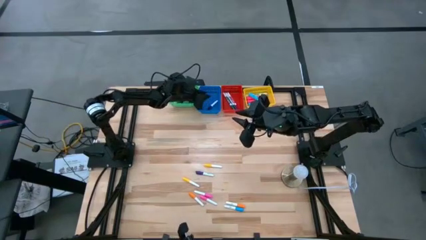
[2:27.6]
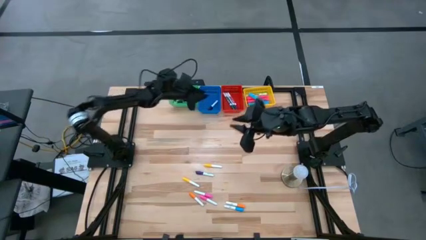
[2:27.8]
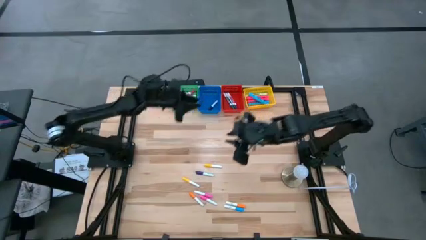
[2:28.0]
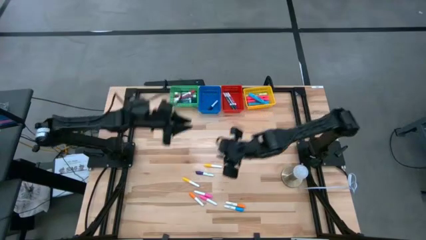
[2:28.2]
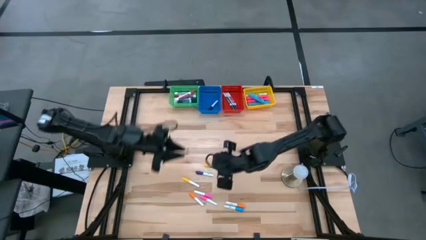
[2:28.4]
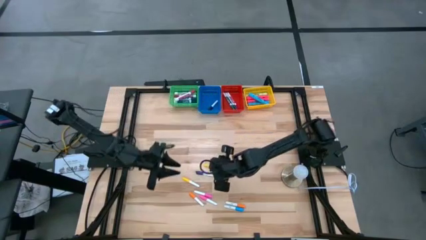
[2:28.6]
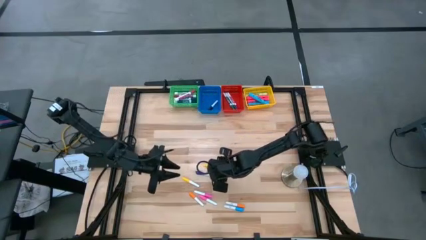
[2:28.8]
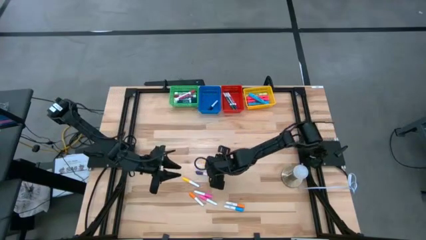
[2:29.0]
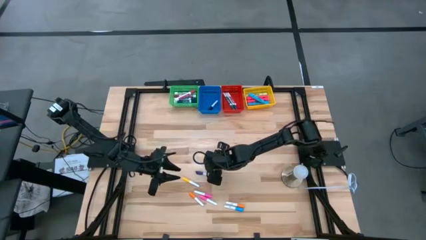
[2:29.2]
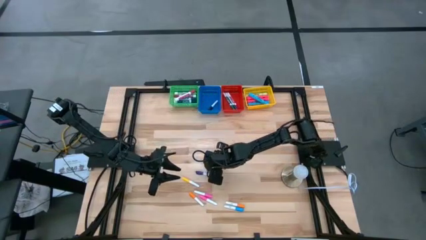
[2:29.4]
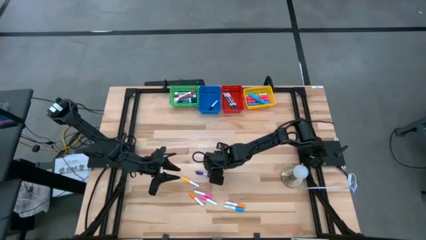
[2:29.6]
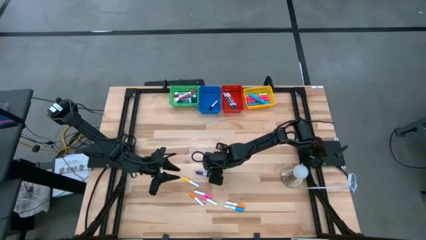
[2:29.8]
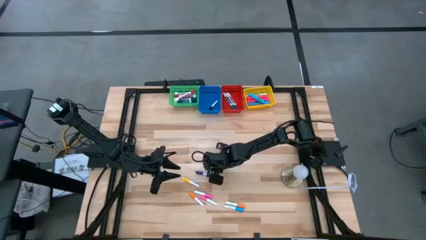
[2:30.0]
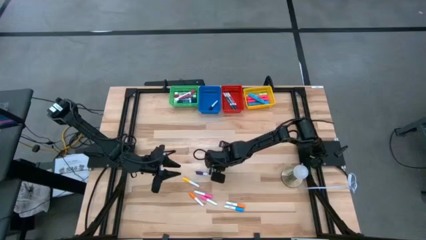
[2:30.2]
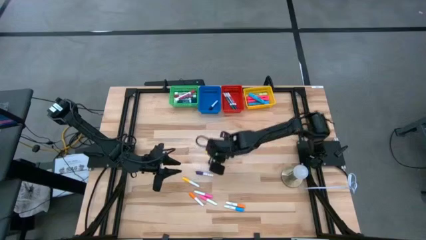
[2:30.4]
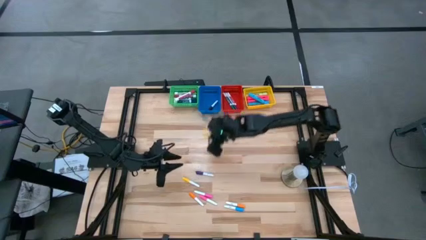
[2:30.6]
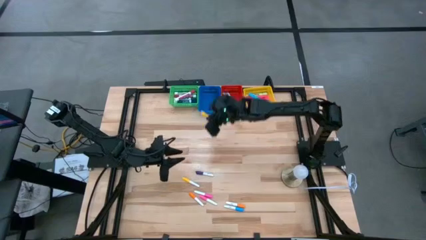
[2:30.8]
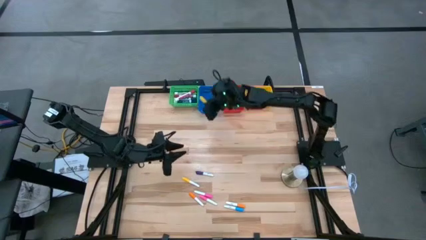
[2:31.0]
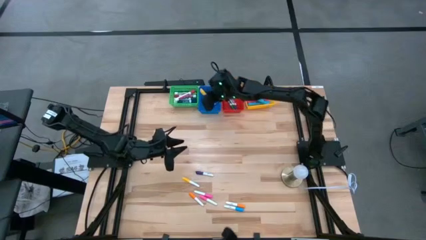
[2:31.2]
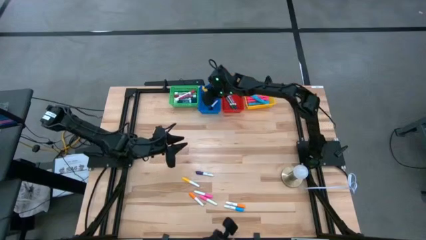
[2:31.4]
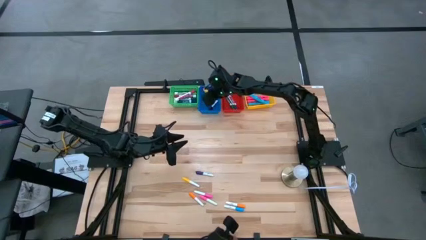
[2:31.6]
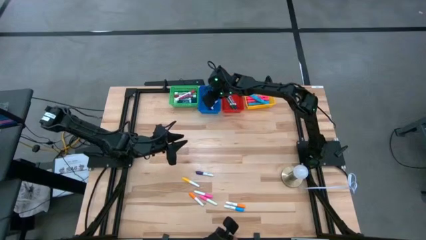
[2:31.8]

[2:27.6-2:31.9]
Task: Pick & Place Markers
Put the top small yellow highlighter pen into the blue bin

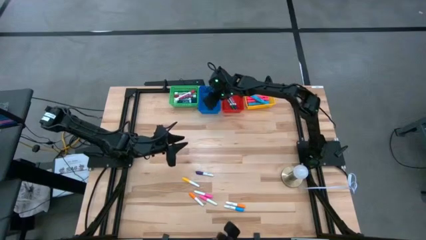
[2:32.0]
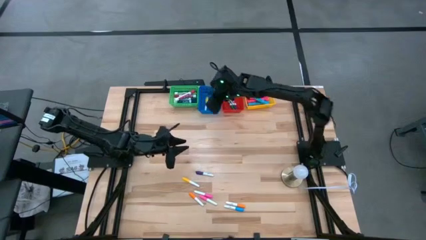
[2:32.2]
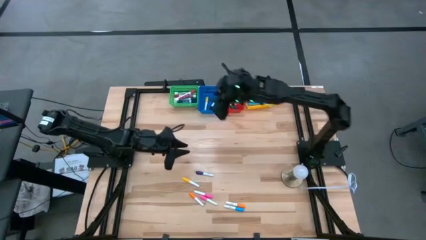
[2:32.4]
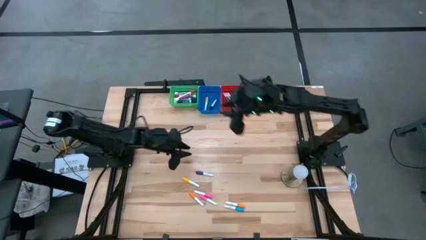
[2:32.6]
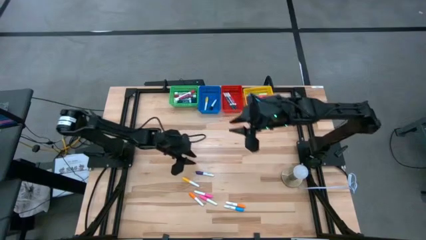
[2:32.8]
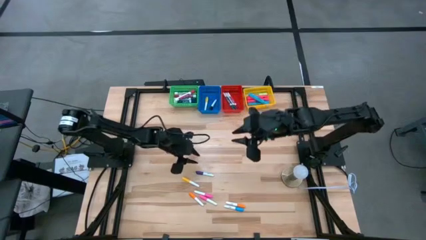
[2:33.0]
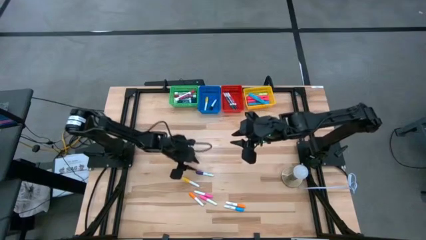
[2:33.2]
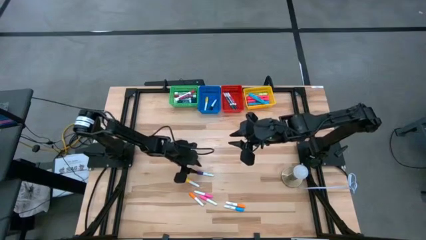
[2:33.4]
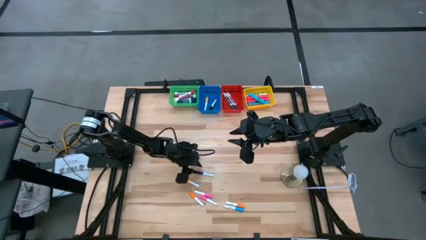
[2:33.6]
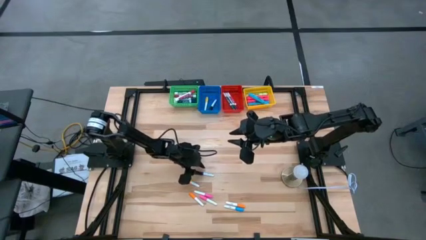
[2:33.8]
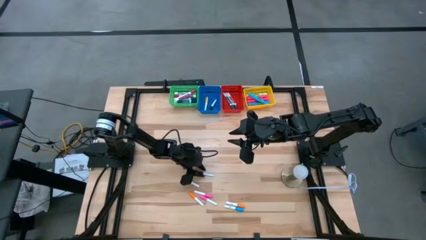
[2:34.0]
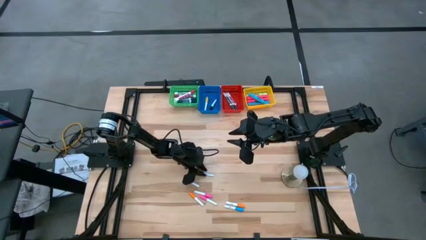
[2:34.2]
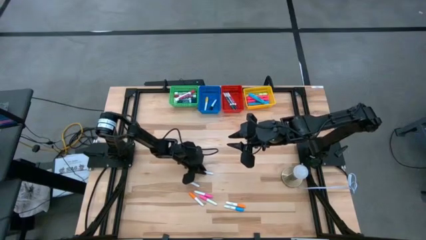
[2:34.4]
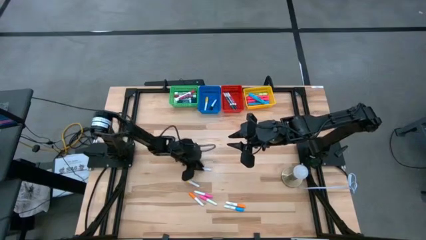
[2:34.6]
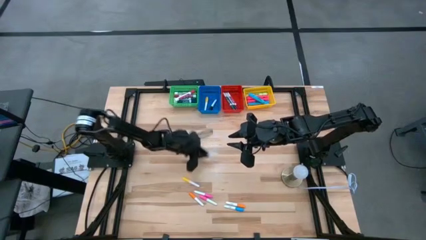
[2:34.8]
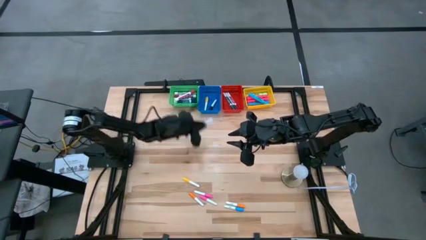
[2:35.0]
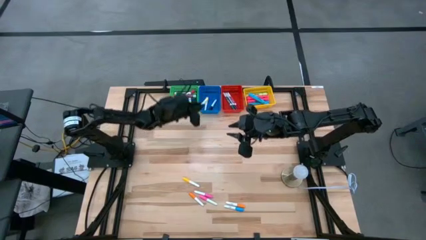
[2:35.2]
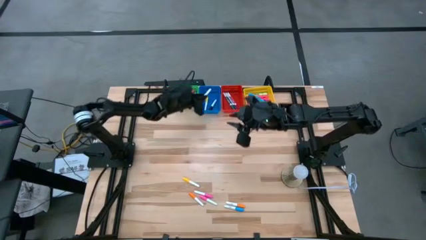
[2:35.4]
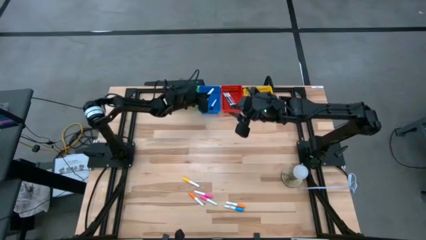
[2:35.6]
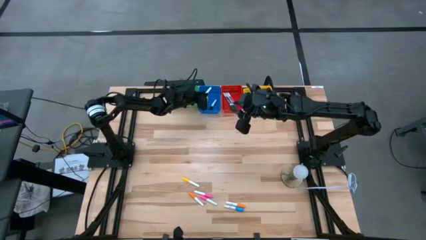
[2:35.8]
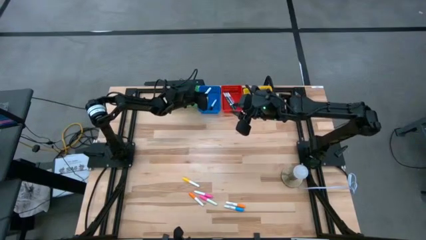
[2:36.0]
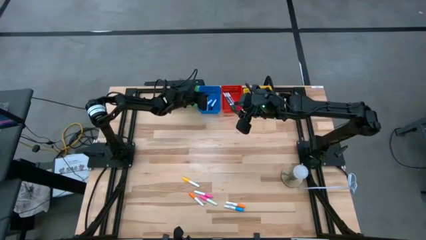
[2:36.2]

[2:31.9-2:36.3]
Put the small violet highlighter pen into the blue bin

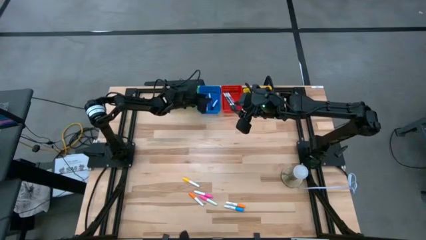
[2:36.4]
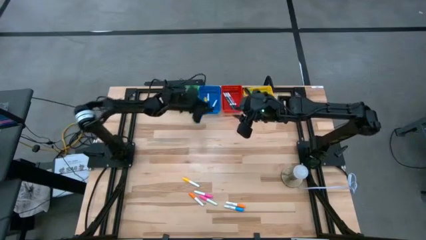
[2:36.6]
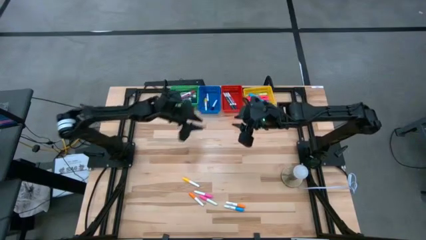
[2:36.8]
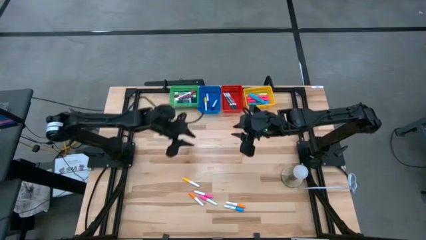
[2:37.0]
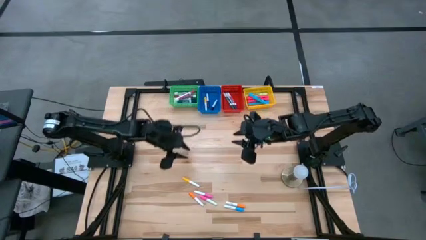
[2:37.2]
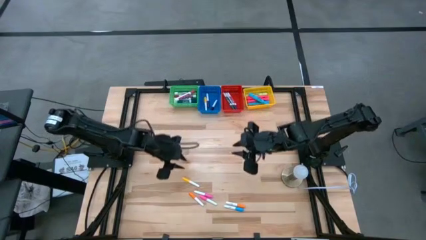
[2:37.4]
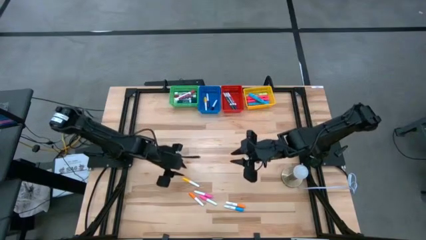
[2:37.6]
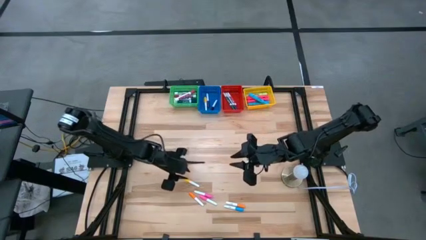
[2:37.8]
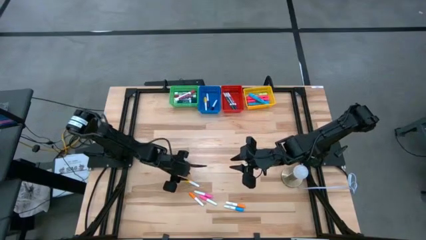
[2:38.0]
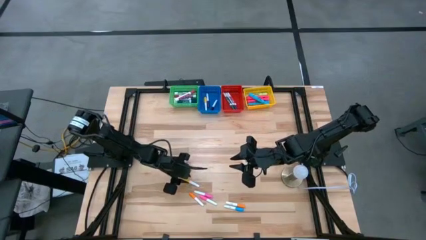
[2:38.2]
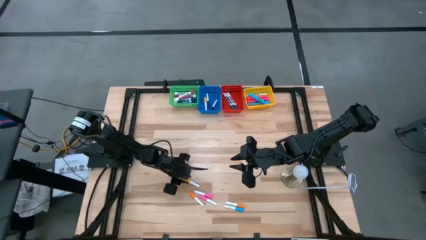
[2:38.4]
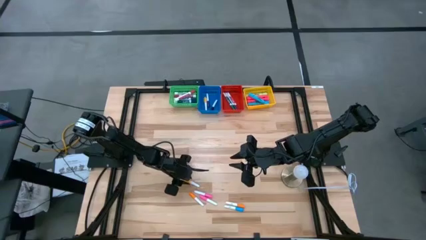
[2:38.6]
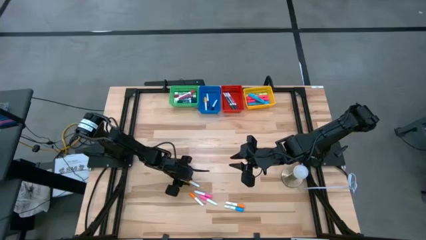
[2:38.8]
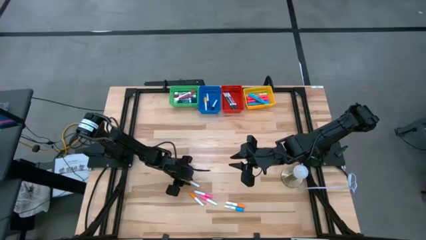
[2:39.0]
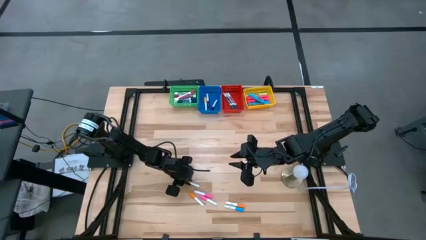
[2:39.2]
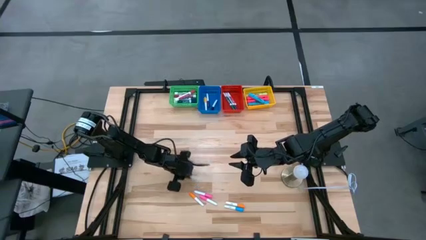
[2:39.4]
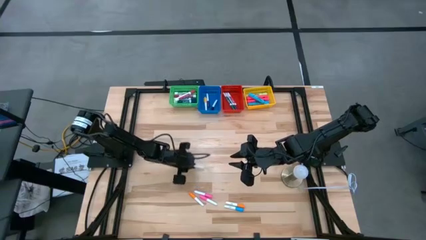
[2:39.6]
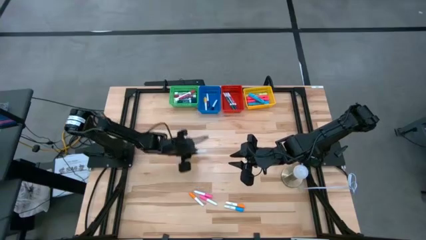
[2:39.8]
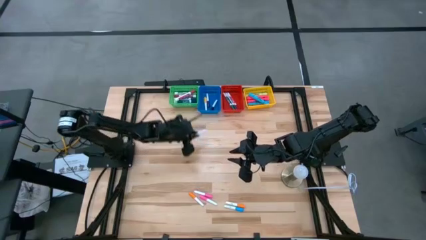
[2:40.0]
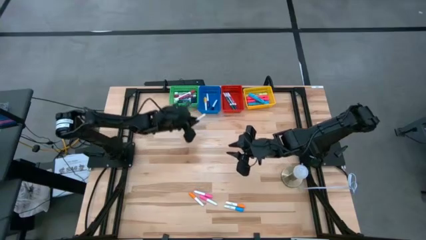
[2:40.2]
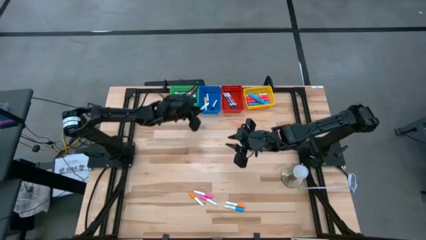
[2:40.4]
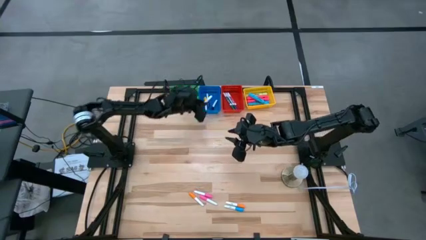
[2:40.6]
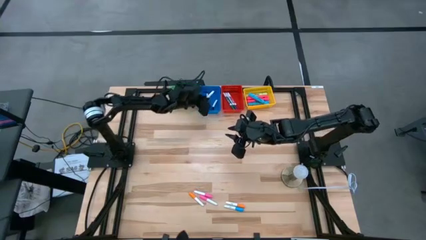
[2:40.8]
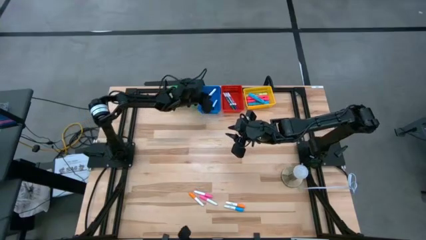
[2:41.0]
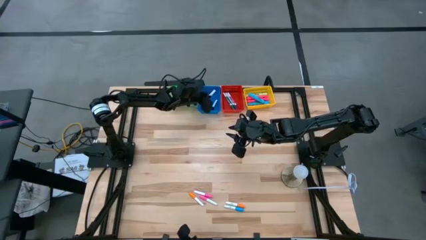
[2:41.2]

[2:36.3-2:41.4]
Put the small yellow highlighter pen into the blue bin

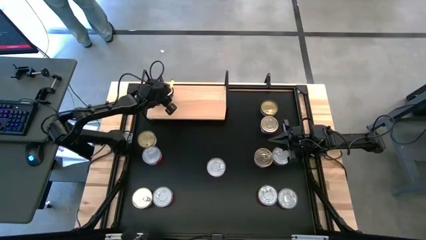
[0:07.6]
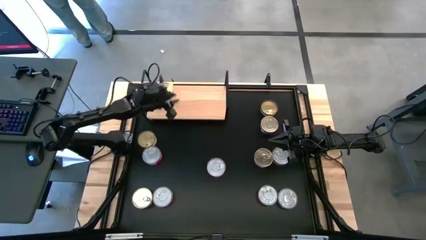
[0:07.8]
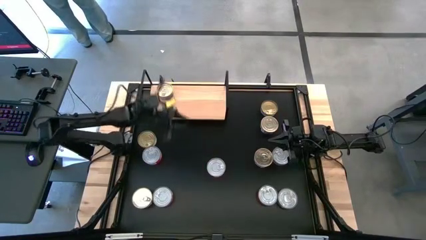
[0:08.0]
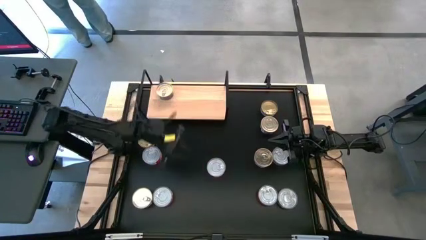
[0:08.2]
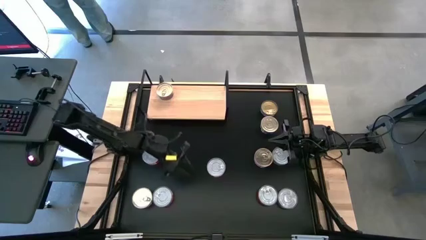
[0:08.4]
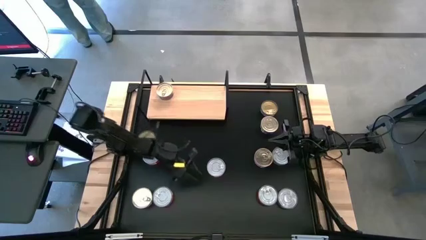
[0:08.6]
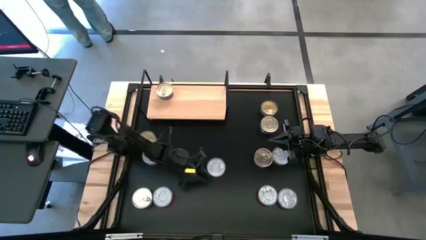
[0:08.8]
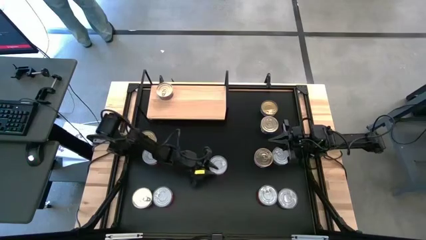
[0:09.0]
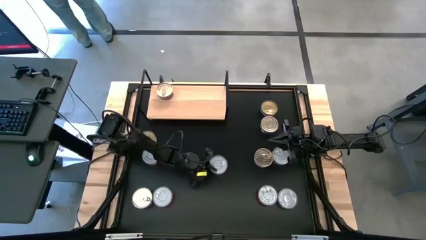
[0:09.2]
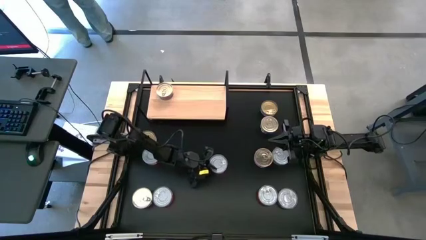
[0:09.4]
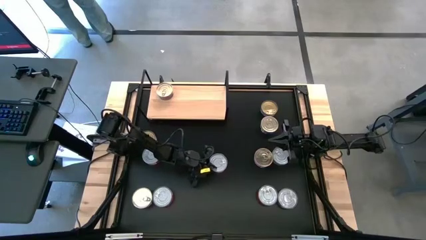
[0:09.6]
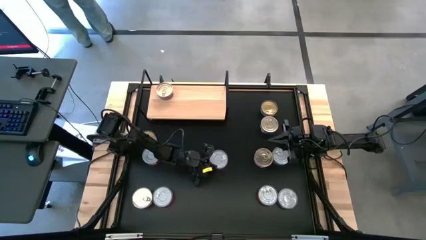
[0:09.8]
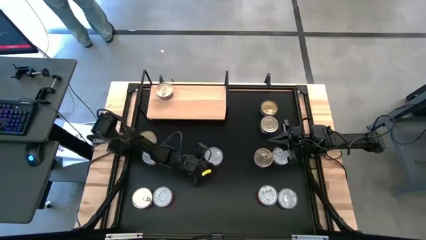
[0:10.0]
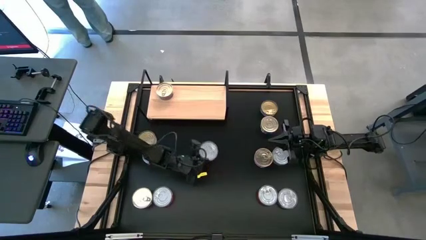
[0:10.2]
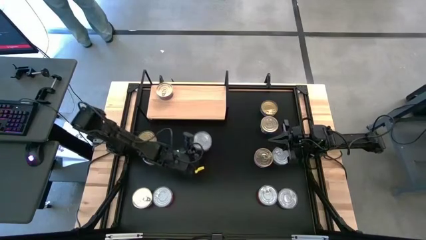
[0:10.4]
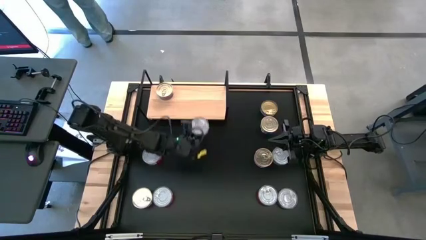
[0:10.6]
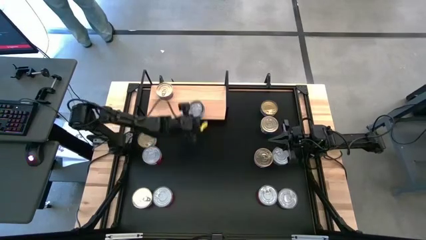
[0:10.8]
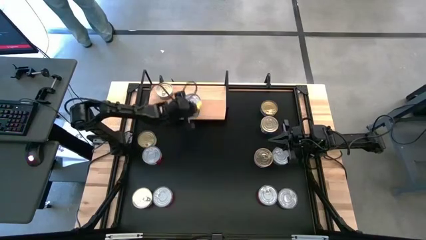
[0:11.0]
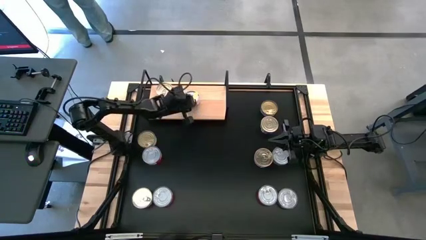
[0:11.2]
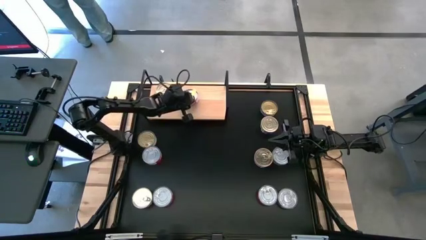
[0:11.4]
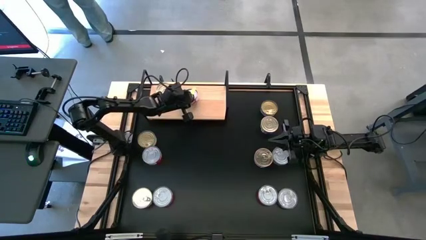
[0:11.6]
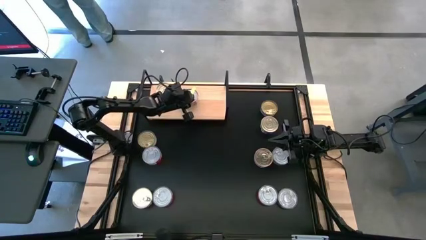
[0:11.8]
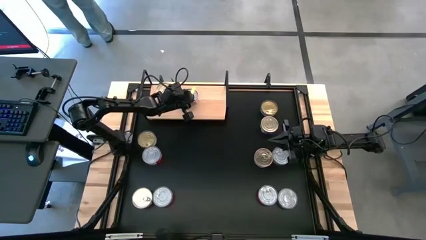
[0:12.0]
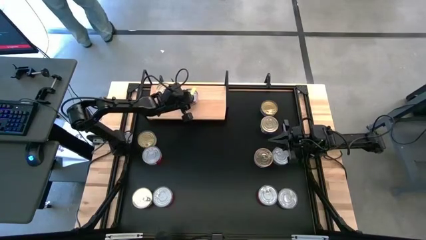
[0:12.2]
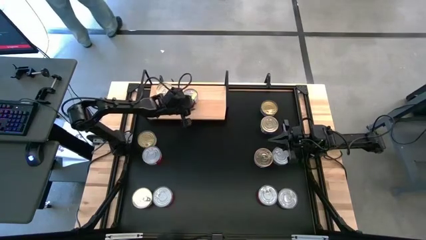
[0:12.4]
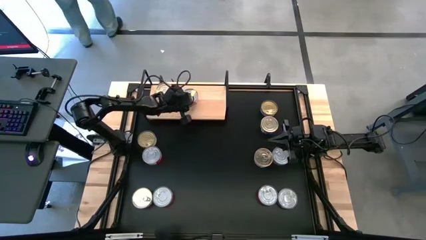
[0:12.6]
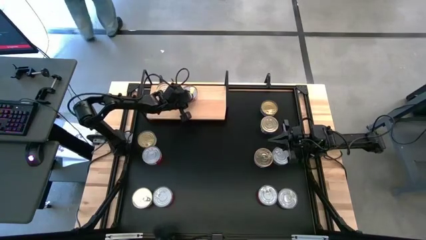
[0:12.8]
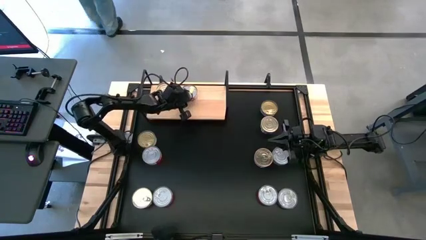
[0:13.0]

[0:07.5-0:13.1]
Task: Stack canned seafood by type on shelf
Put the middle red tuna can on the shelf
